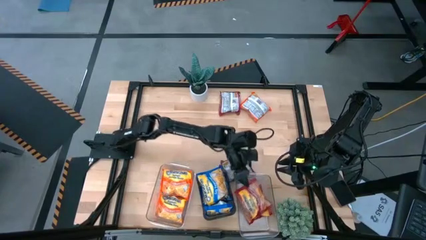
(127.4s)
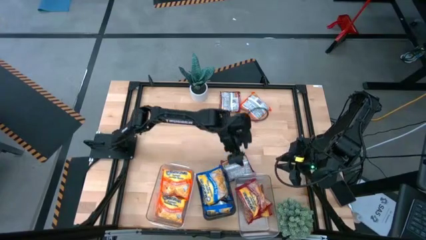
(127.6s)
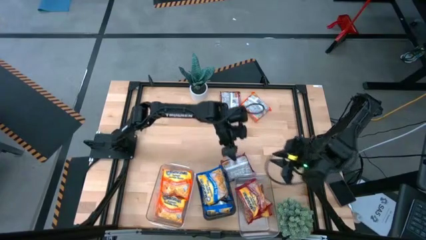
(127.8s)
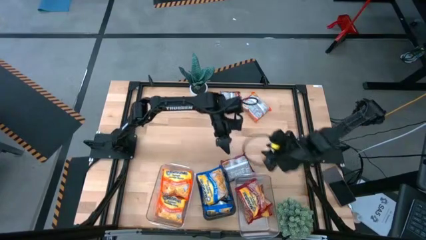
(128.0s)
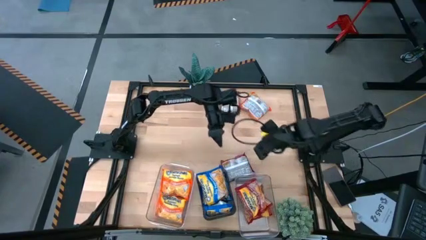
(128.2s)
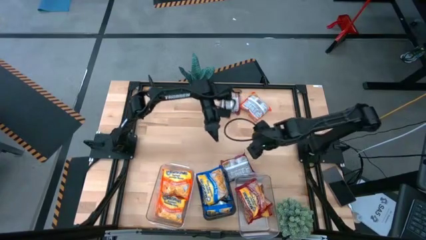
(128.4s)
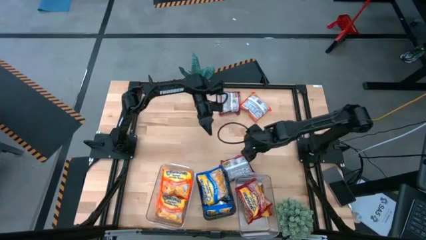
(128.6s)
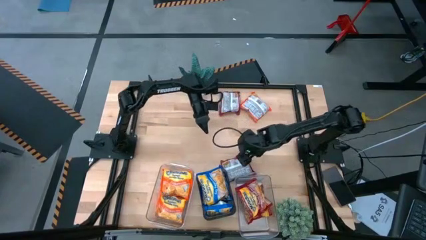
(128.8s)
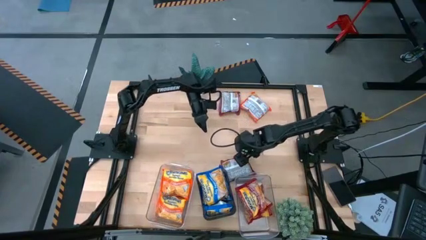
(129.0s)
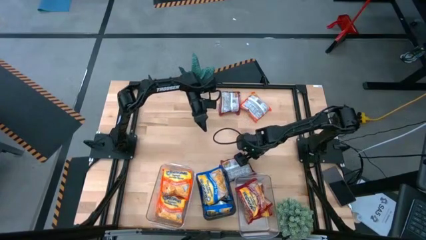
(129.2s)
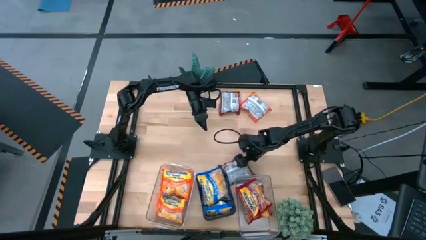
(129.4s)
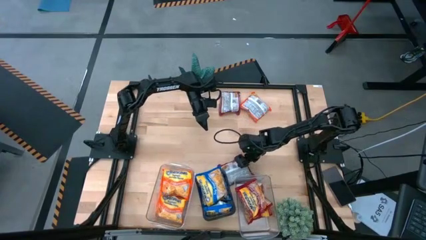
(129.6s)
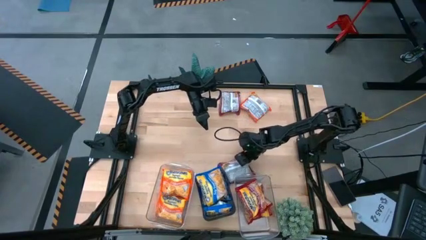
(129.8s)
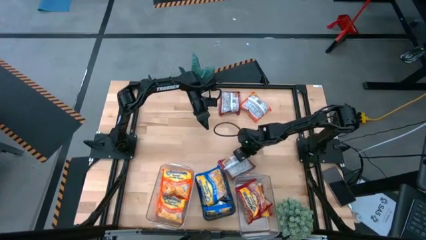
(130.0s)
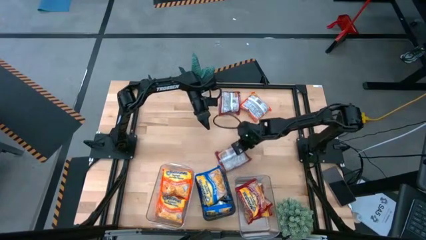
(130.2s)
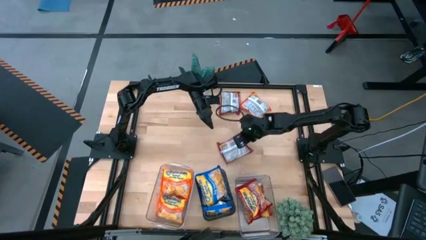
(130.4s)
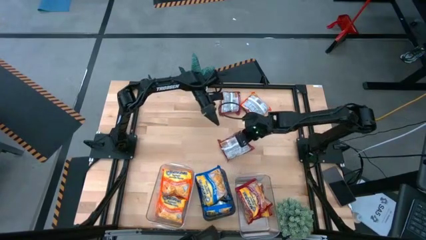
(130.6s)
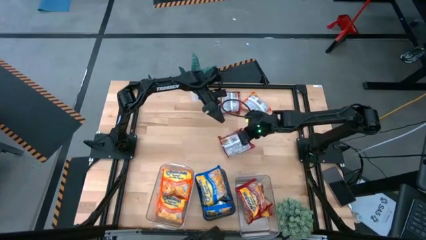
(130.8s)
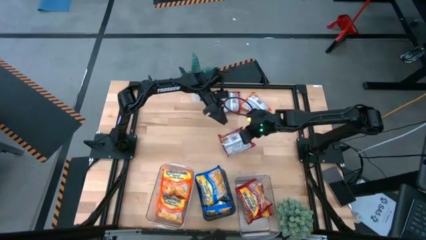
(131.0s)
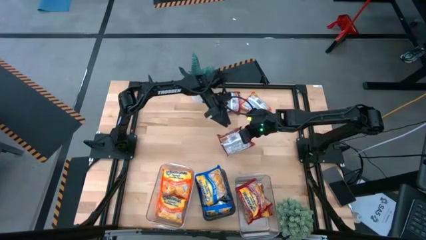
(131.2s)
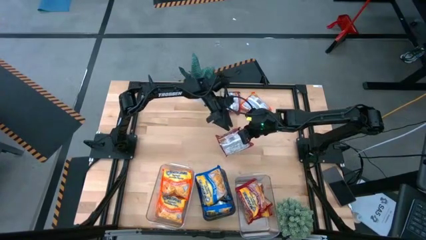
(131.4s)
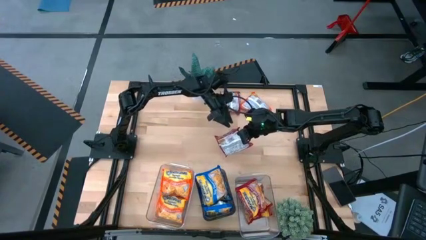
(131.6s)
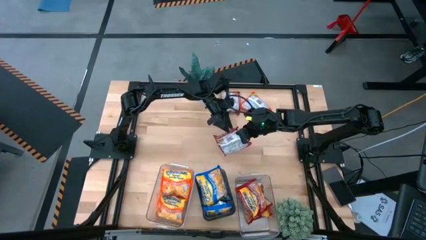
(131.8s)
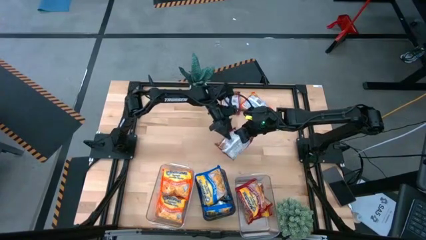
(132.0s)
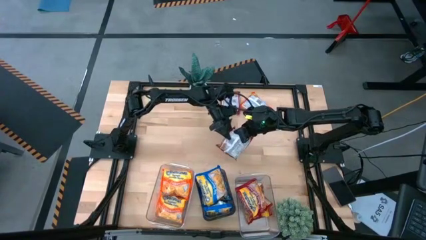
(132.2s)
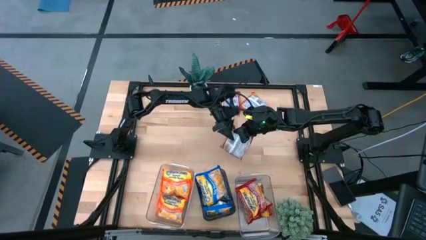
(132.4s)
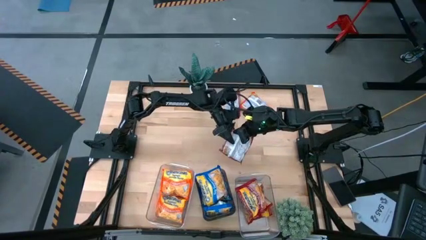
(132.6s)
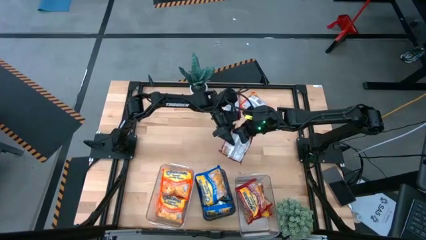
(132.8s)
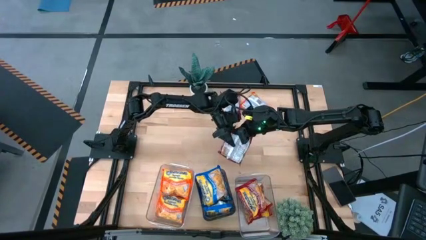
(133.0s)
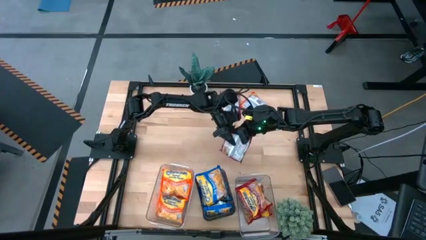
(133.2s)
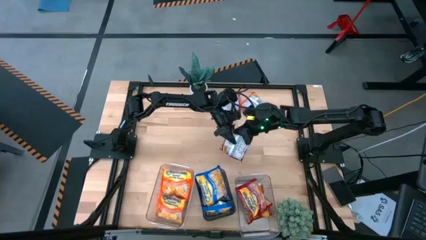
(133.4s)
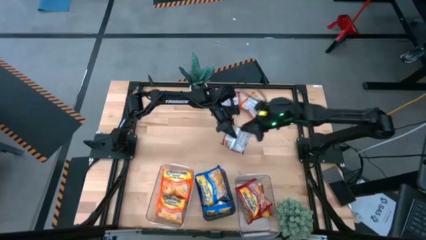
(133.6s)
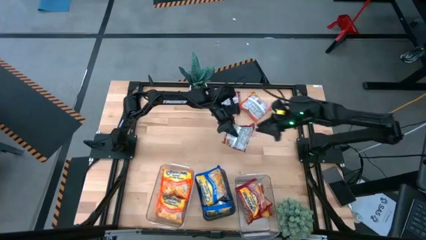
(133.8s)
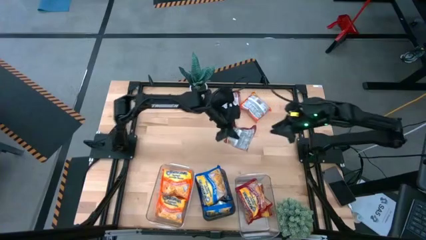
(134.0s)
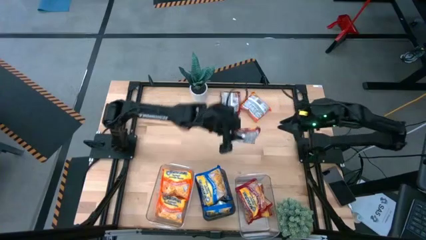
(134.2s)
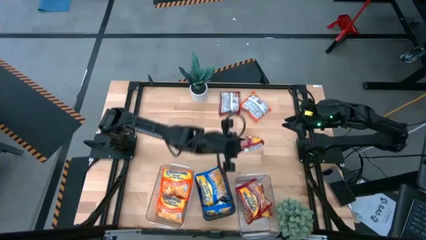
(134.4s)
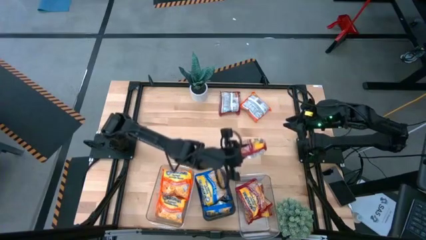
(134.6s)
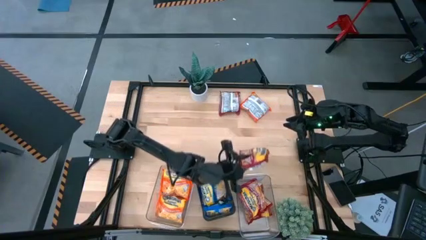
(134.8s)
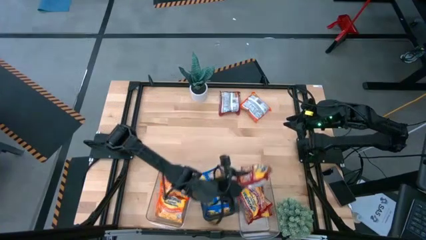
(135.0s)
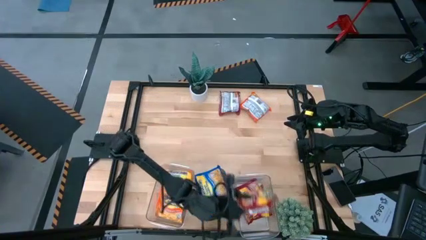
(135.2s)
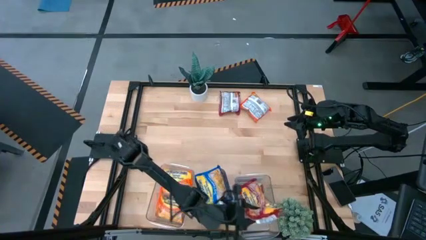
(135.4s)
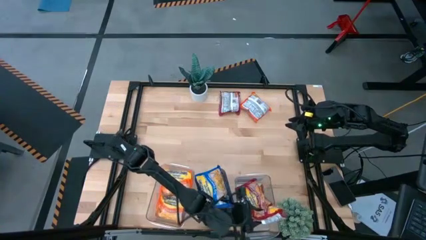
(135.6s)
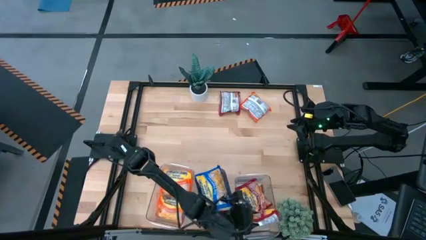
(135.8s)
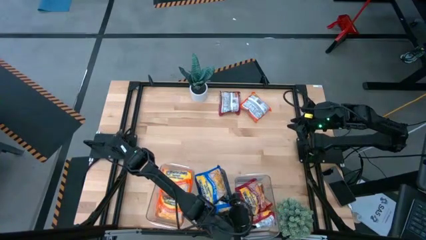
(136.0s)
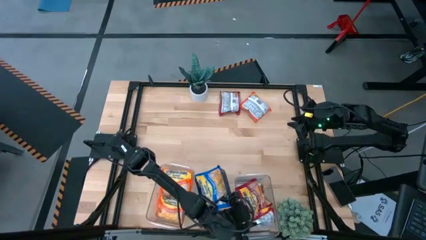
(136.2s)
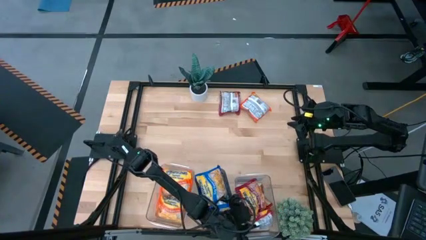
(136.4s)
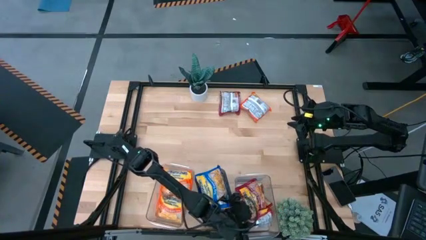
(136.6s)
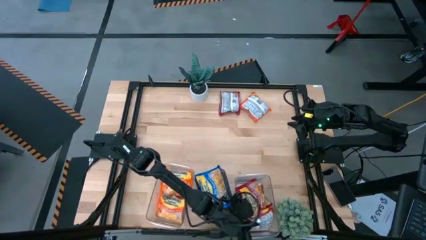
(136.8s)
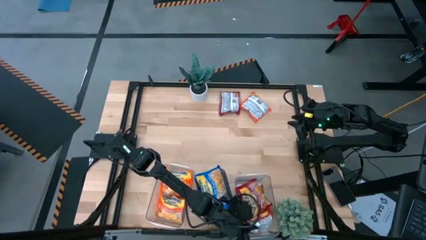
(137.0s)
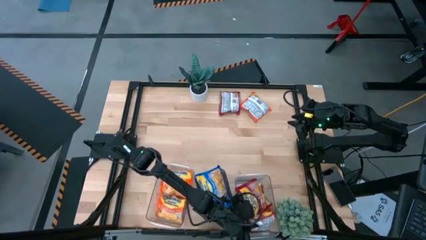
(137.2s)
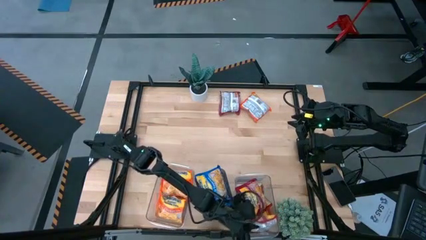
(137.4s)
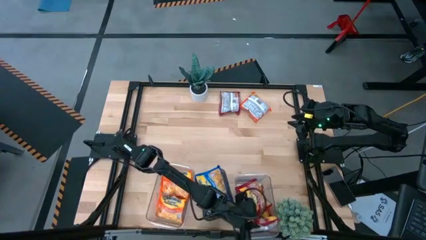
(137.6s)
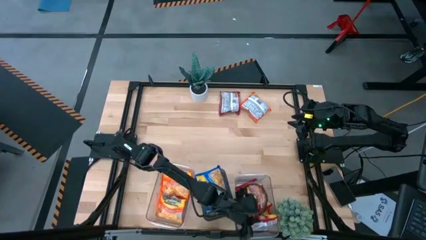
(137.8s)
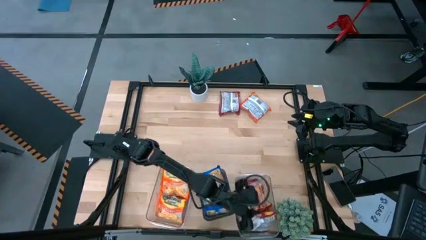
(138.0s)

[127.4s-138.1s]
Task: Sort Maruchan noodles
Put the red noodle pack into the right transparent bin

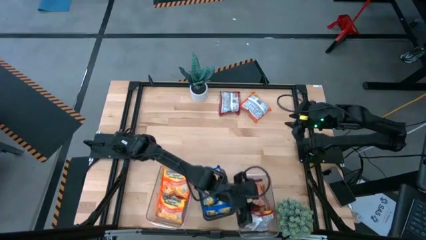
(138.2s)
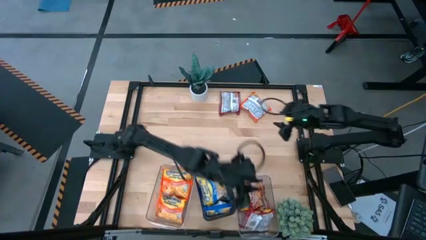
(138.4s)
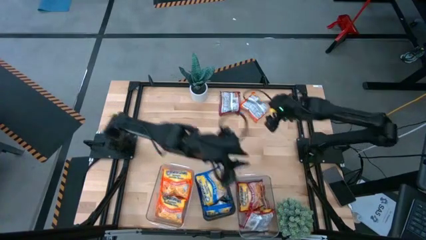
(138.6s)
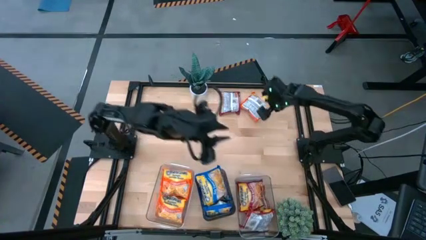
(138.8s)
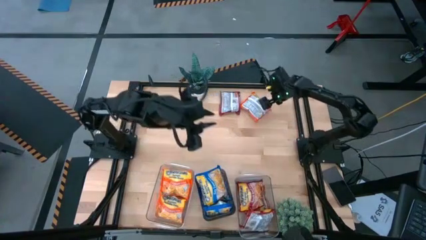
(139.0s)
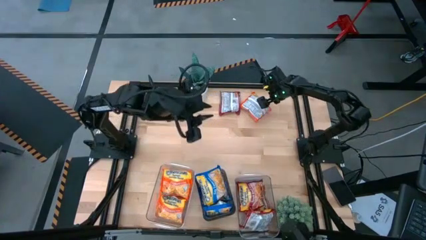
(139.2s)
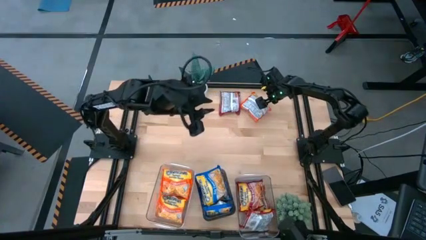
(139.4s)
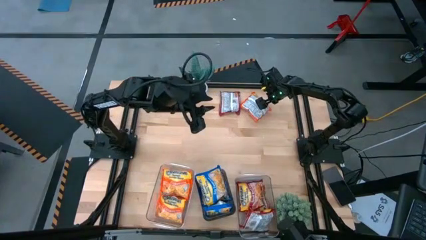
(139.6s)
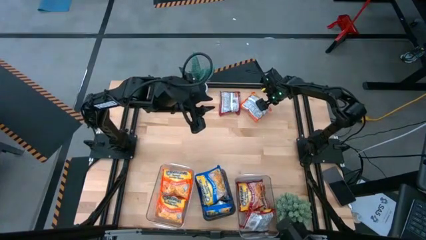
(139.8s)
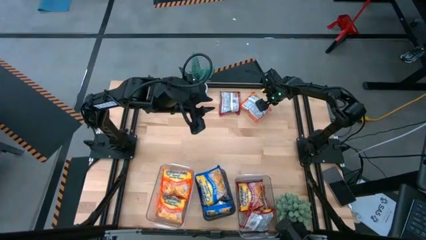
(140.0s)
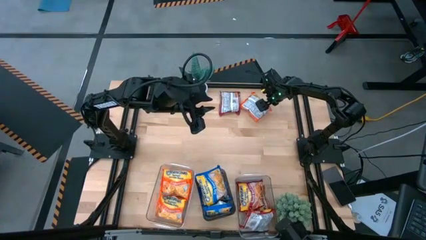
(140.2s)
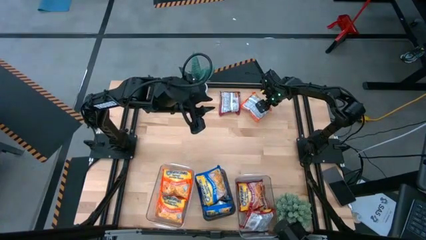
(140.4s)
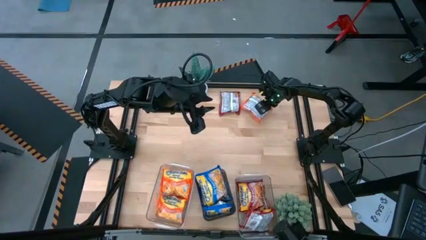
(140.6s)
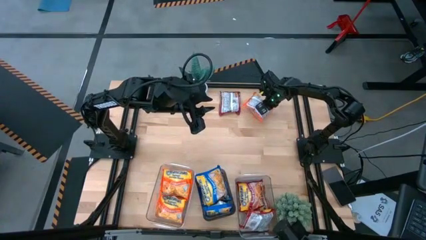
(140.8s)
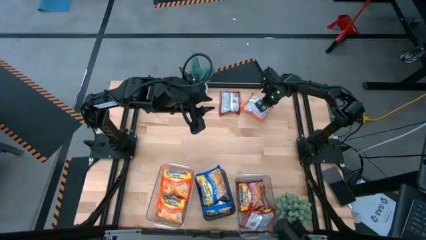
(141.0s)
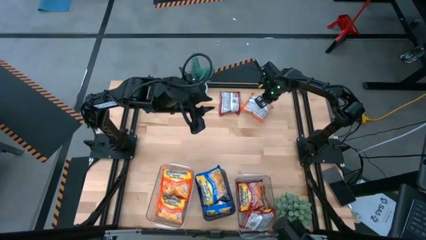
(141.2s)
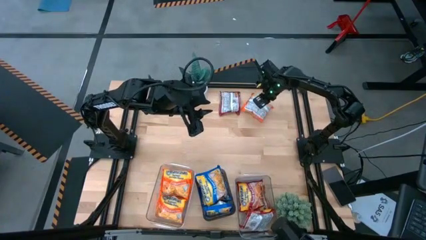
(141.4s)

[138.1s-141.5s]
Put the orange noodle pack into the left transparent bin

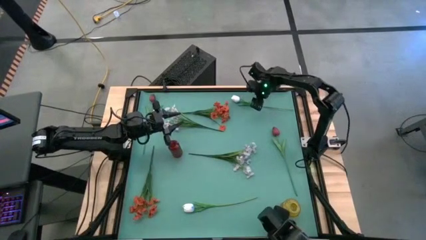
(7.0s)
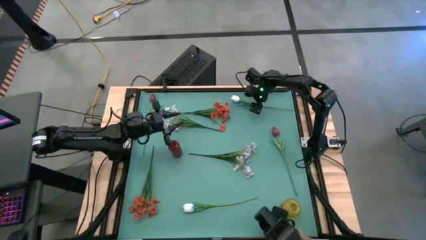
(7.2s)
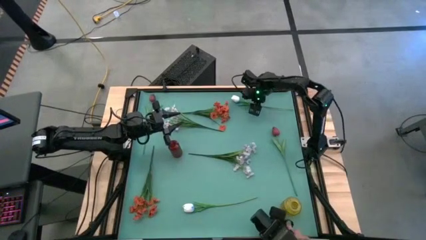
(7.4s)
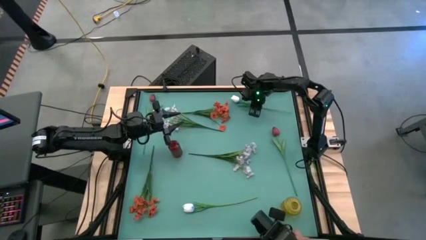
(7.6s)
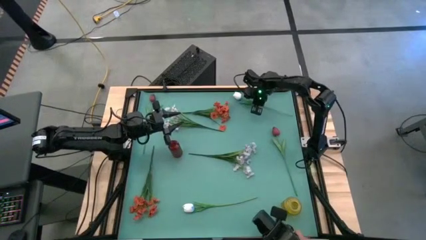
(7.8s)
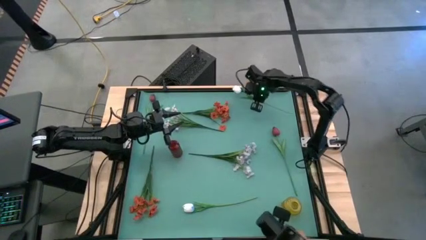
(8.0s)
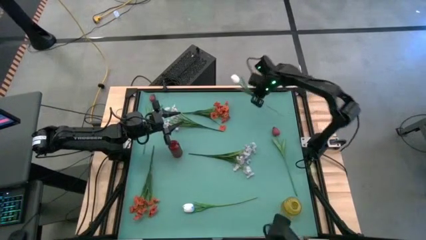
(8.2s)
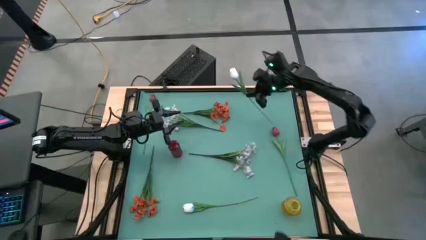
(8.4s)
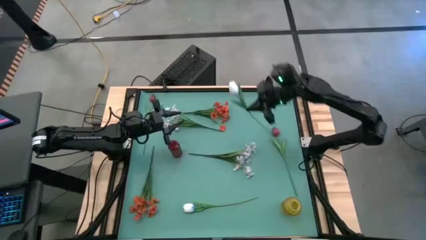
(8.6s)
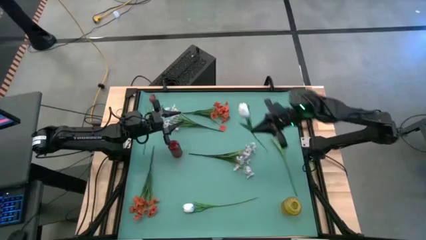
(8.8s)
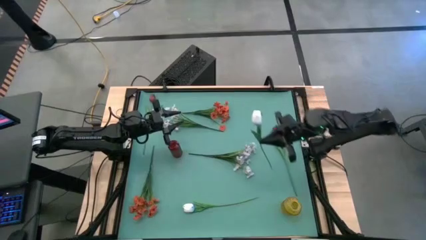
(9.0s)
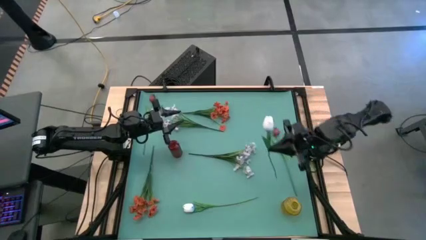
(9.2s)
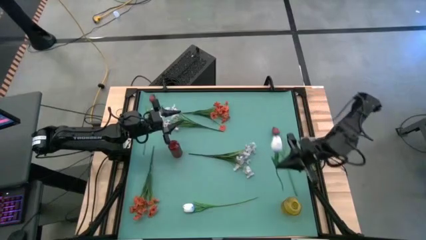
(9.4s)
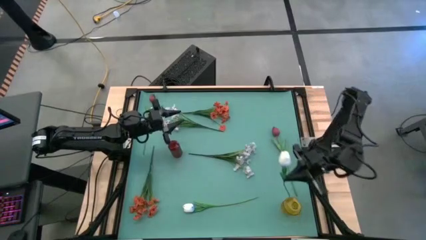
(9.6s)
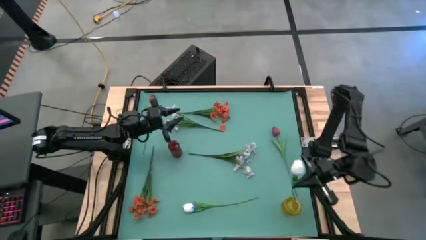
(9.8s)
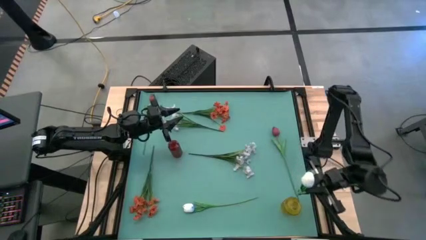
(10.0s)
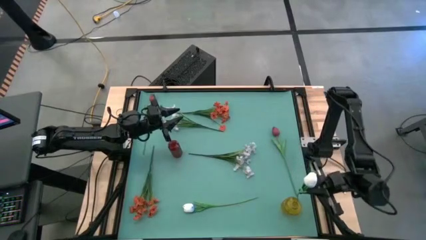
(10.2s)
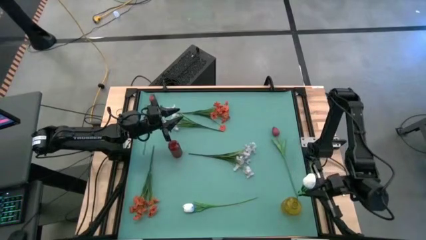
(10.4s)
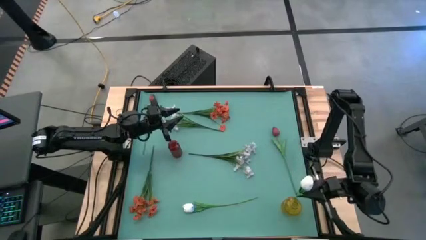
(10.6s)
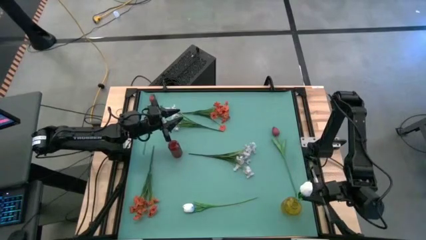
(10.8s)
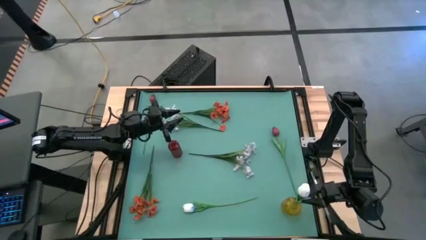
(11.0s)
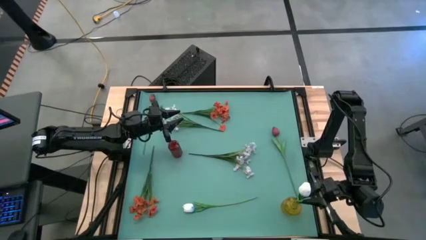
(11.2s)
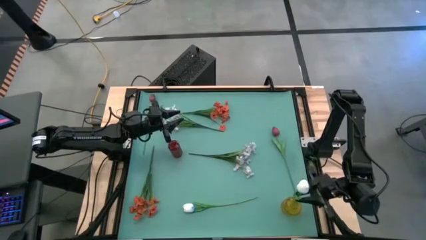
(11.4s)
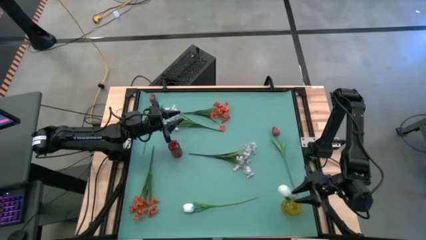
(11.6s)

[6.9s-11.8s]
Task: Sort flowers into vase by color
Put the top white flower into the yellow vase
